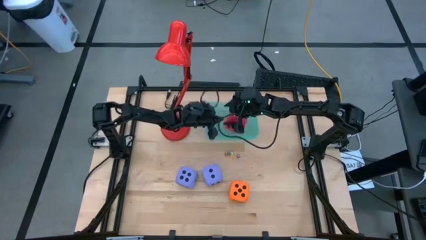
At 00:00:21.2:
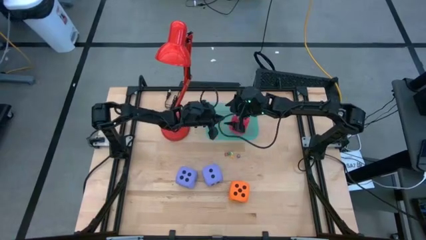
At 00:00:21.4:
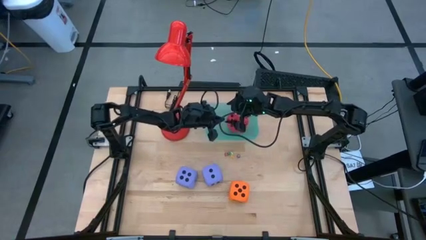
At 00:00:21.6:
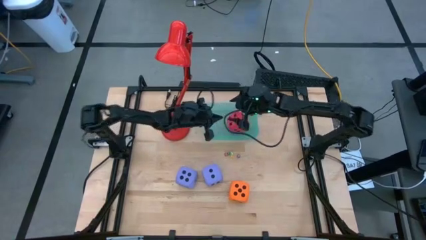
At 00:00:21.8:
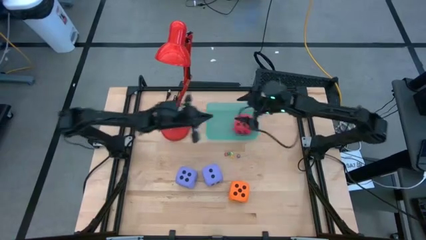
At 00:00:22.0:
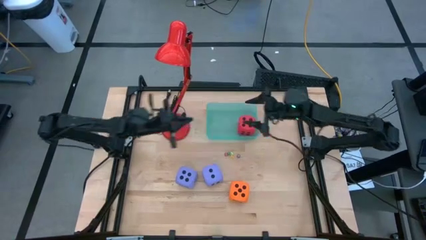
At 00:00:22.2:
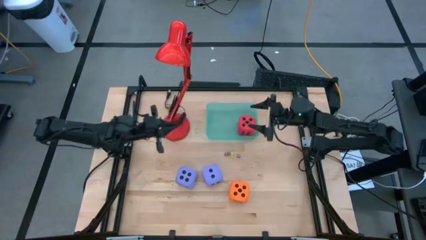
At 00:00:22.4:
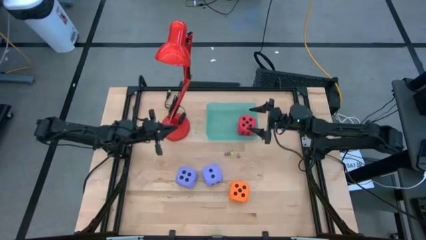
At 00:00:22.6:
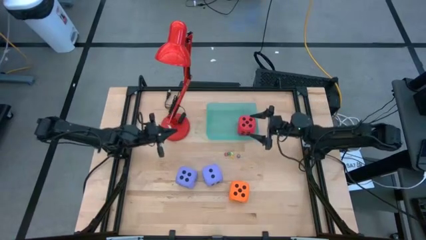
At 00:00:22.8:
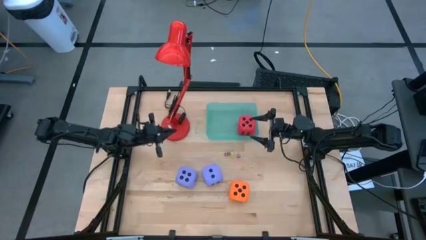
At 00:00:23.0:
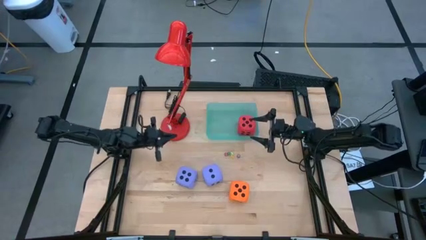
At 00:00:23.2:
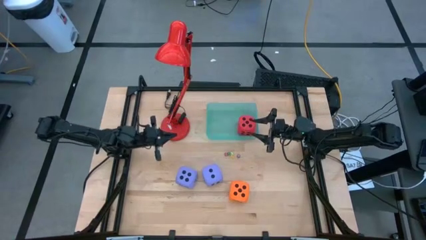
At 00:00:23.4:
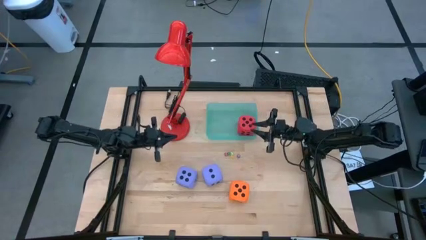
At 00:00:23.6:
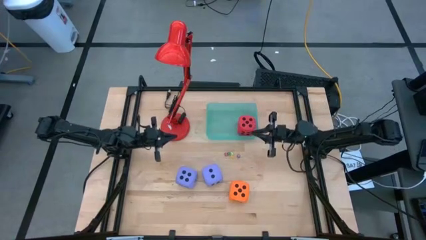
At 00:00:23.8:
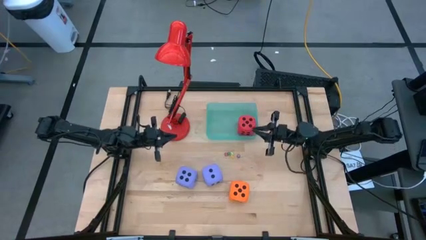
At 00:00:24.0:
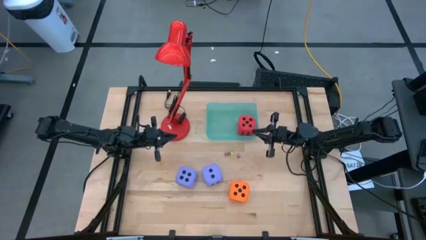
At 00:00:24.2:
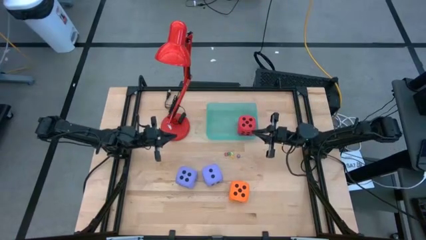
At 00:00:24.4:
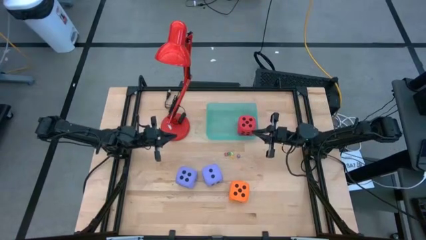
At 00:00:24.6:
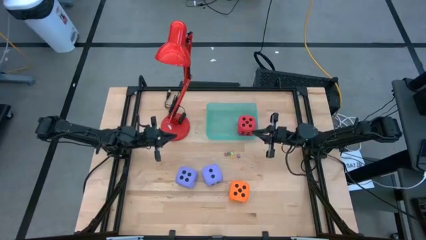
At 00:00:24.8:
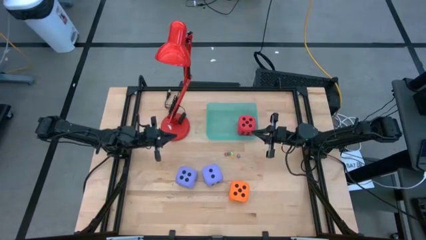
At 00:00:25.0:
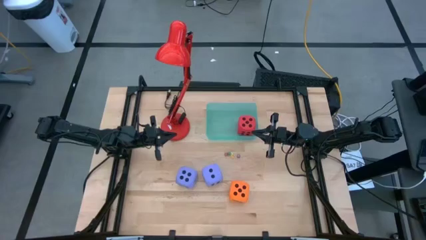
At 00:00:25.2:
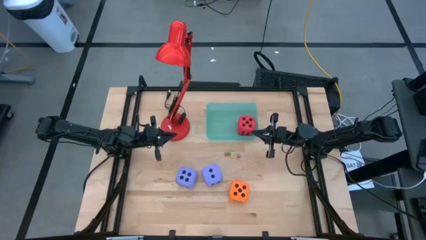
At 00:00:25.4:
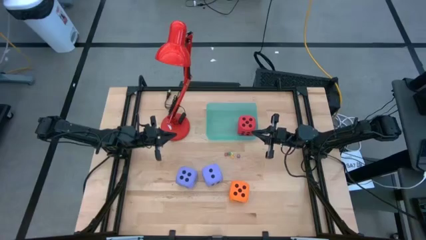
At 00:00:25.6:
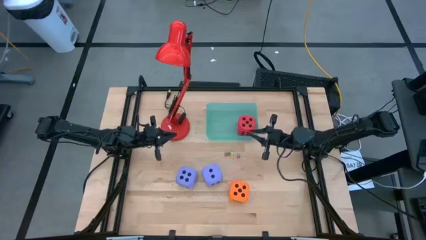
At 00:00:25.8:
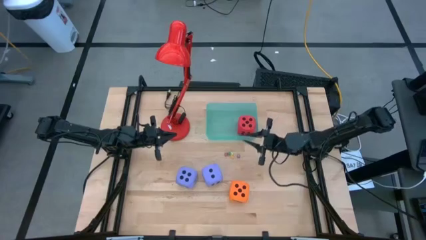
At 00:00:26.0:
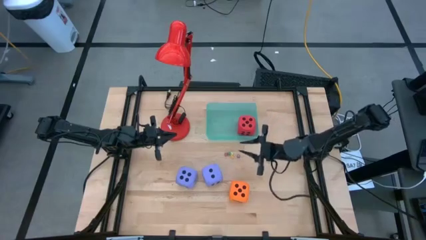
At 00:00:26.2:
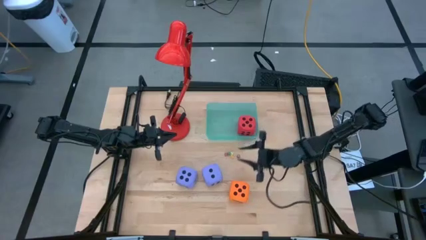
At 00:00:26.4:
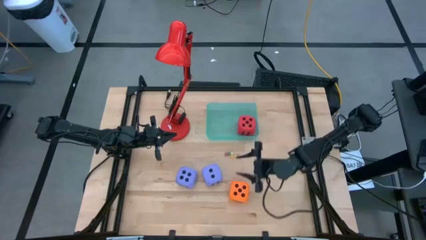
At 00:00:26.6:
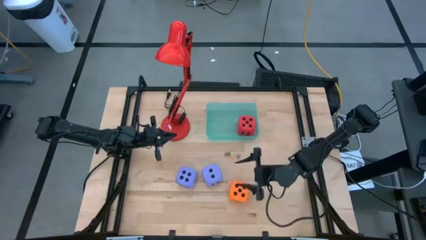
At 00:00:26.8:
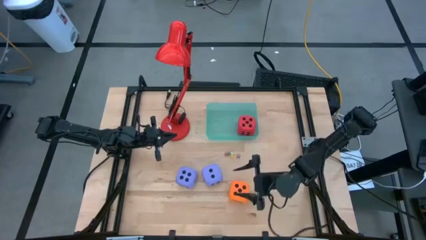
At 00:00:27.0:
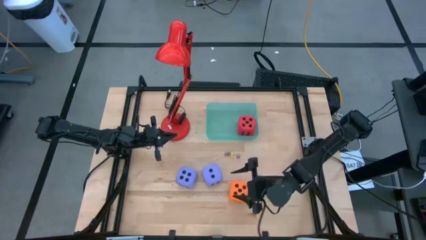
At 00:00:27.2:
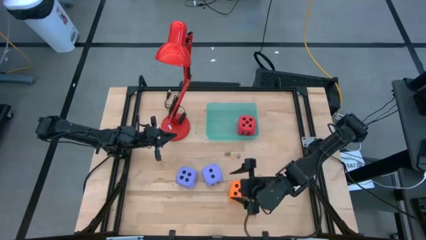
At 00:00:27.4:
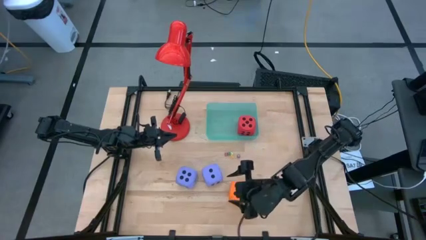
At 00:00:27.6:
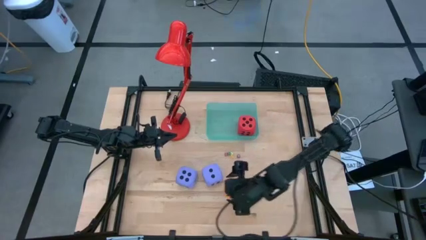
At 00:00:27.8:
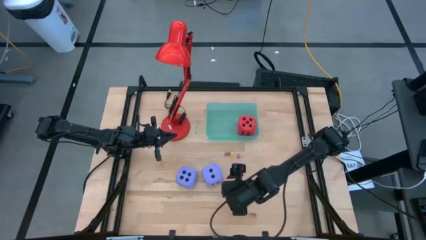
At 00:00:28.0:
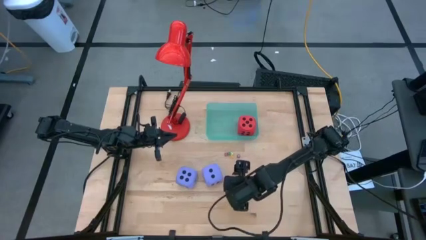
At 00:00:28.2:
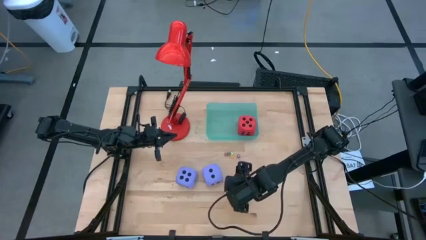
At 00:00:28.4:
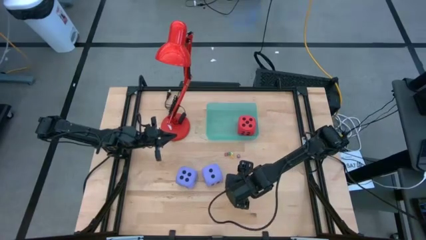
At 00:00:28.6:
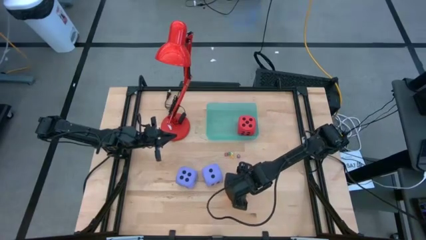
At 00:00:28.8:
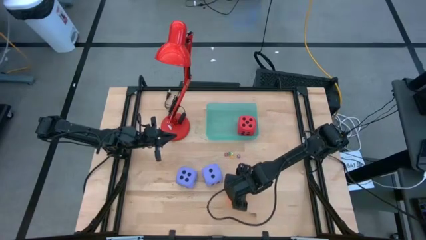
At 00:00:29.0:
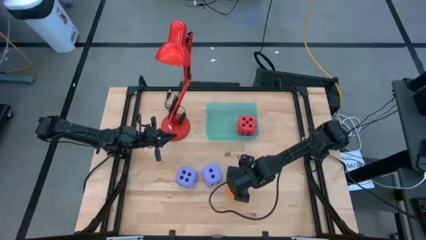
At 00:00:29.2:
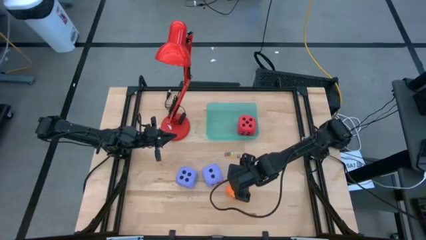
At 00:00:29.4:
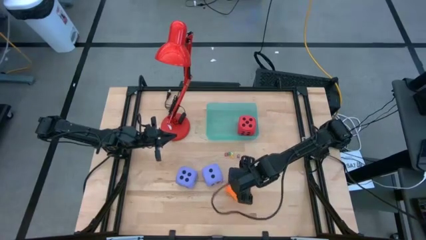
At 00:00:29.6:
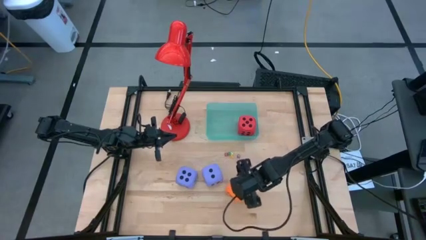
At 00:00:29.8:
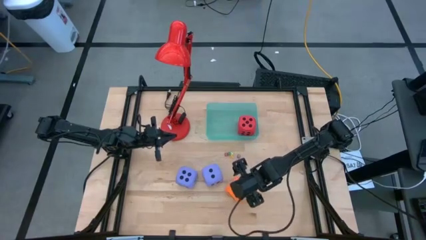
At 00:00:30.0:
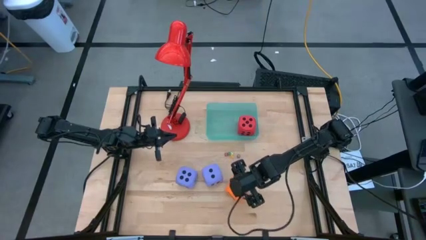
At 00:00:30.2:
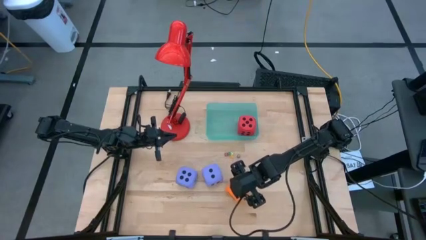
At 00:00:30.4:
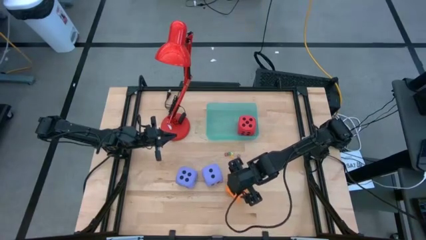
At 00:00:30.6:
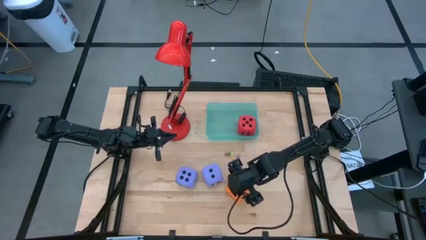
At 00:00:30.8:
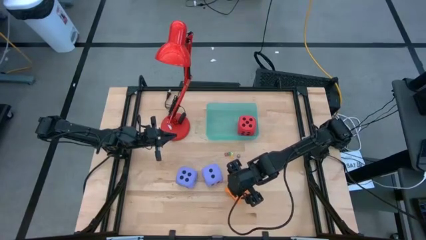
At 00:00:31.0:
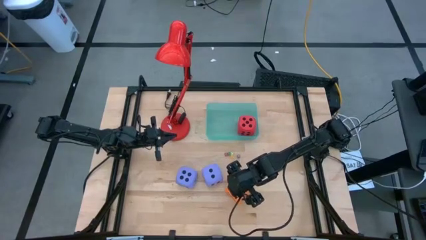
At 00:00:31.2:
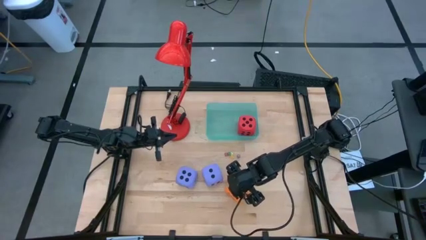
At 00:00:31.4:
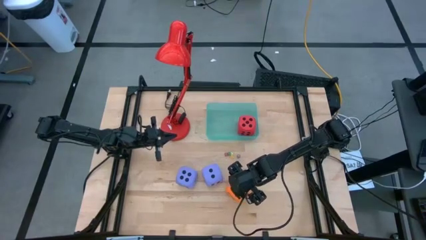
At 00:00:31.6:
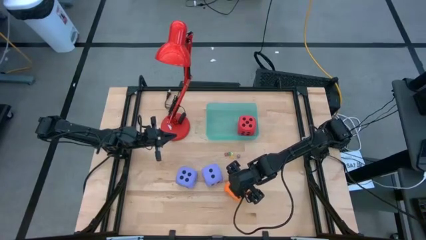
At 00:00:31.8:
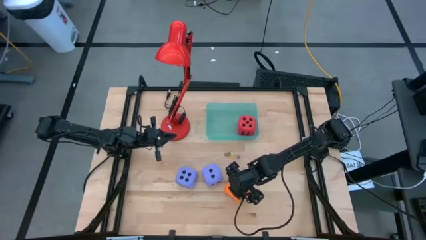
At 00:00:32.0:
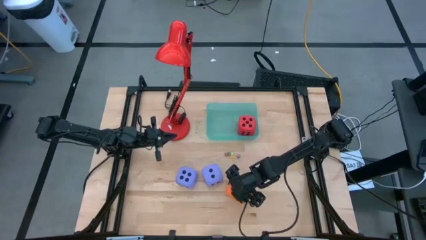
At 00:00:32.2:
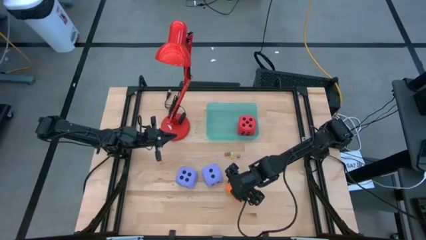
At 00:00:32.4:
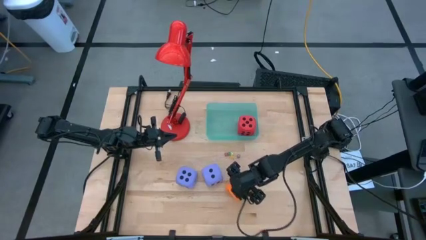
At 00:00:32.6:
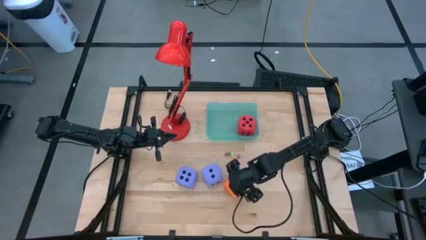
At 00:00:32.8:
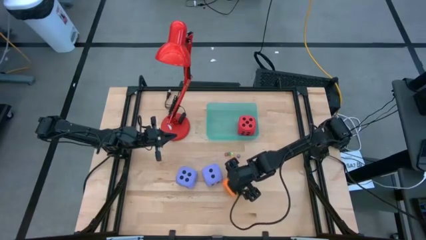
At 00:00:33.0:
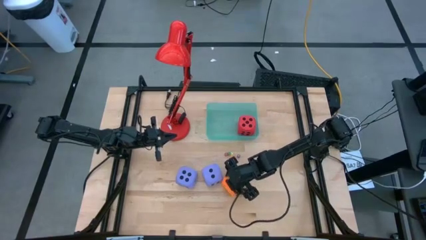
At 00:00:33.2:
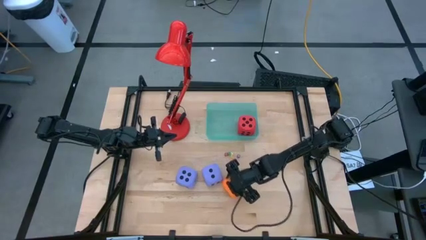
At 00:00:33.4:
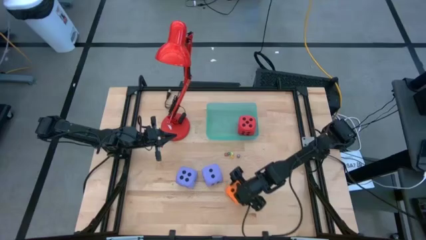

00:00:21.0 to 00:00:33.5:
Task: Pick & Place Dice
Put the large orange dice into the bin

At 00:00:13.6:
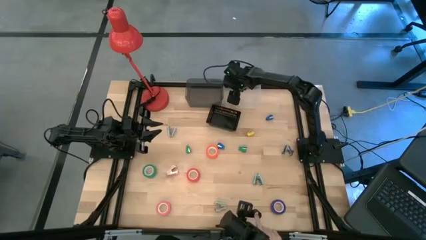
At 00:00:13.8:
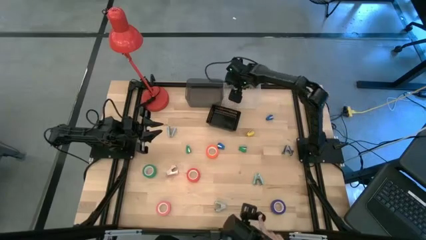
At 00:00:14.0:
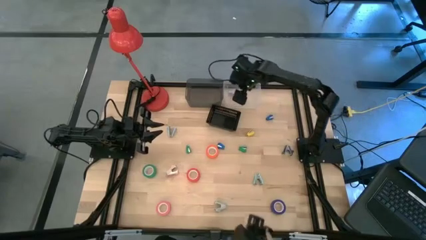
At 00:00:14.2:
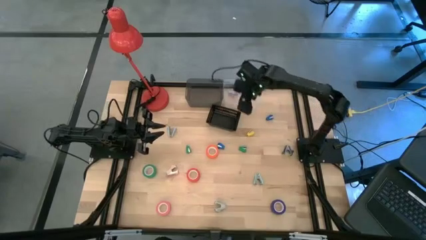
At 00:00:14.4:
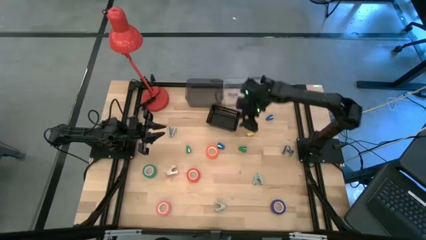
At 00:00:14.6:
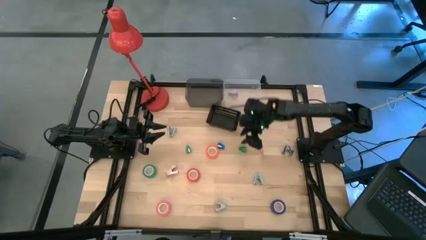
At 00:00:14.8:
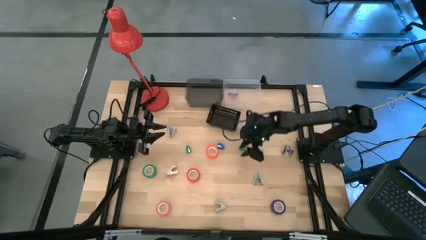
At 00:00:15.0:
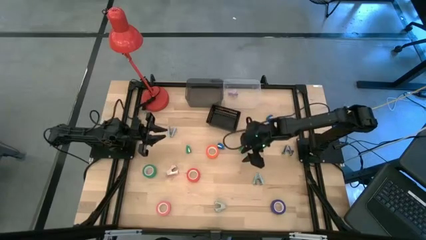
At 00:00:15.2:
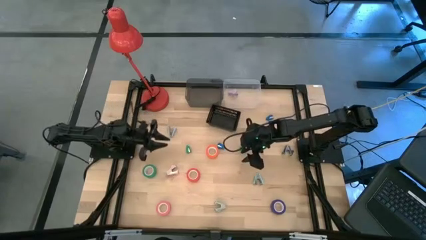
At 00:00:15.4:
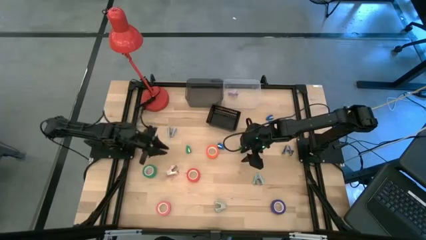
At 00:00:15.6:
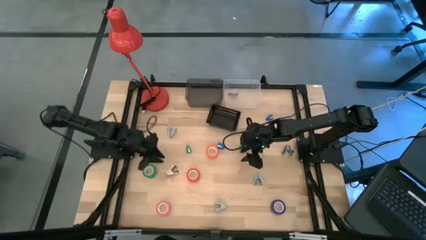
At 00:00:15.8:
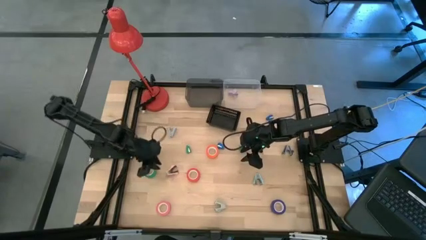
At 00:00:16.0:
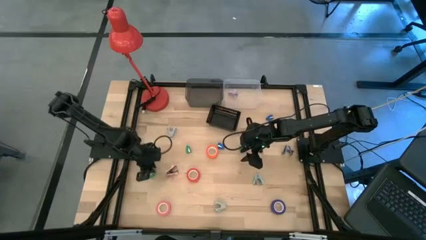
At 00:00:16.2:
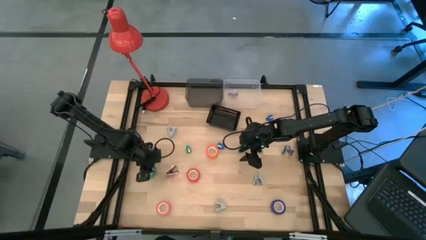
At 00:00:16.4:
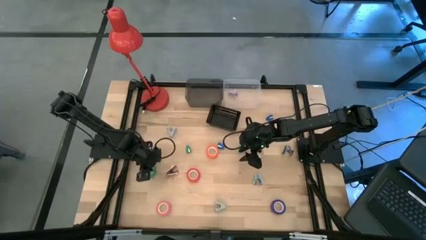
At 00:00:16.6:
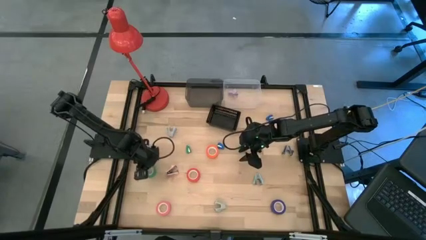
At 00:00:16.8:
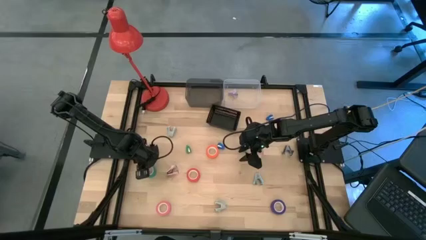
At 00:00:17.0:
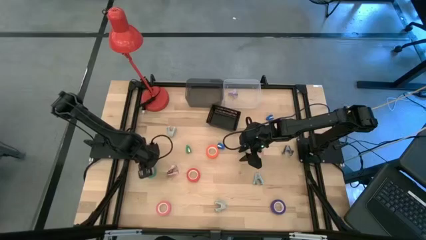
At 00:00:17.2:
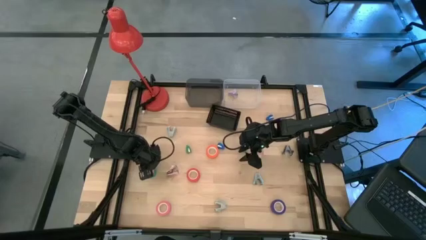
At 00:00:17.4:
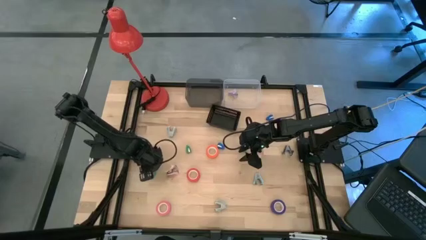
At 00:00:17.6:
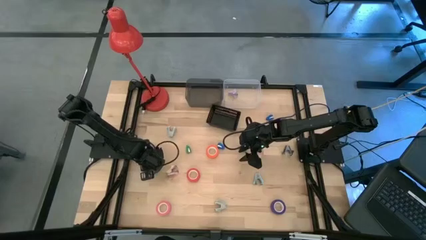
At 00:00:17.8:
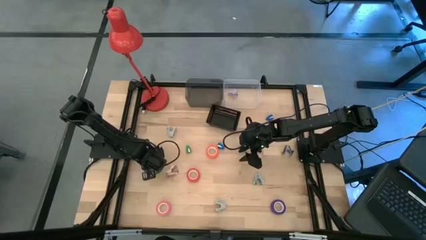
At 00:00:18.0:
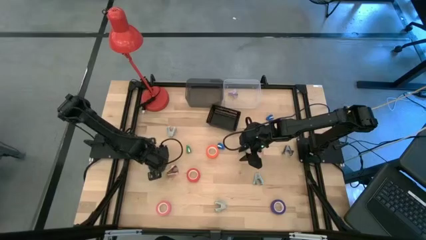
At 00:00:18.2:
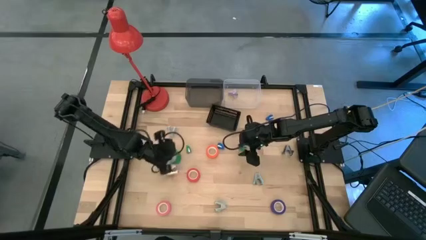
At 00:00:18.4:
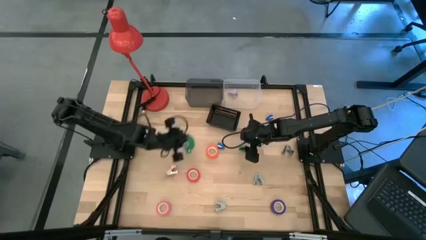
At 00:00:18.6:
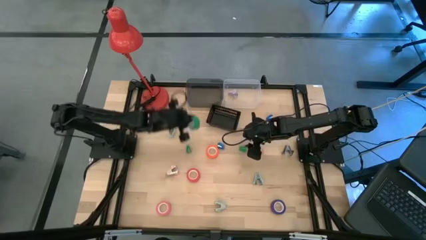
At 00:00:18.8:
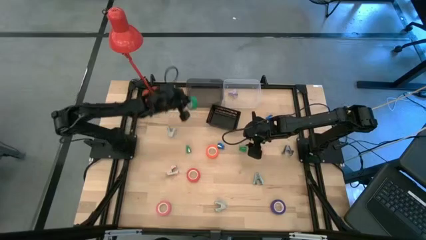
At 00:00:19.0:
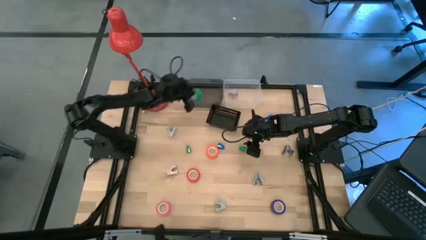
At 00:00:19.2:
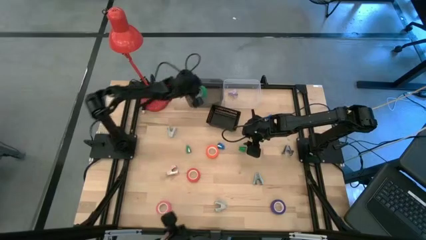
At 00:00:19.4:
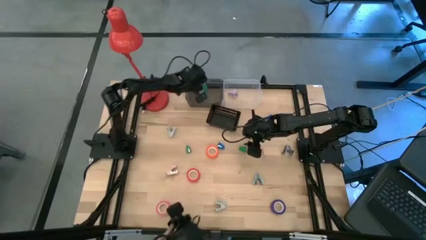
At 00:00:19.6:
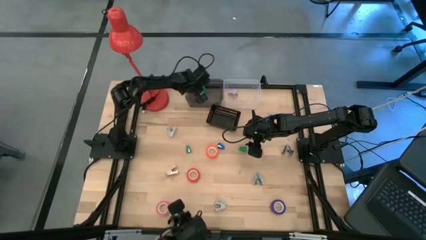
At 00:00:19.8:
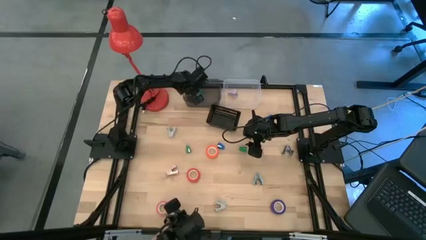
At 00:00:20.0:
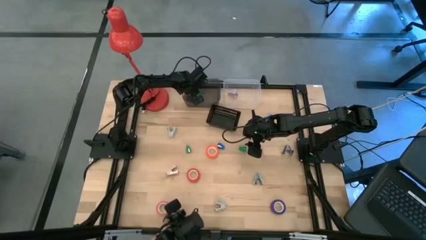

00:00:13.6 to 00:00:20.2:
Task: Pick and place Stapler, Stapler remover, tape
Put the green tape into the black transparent bin
